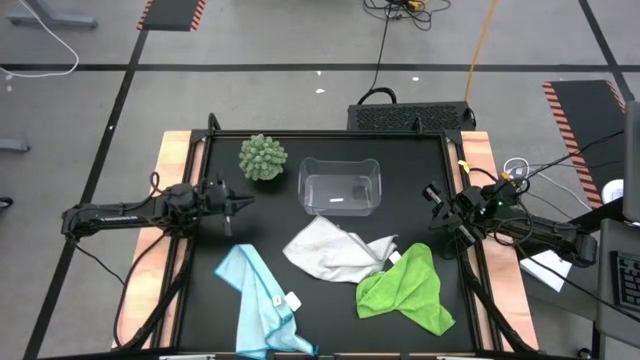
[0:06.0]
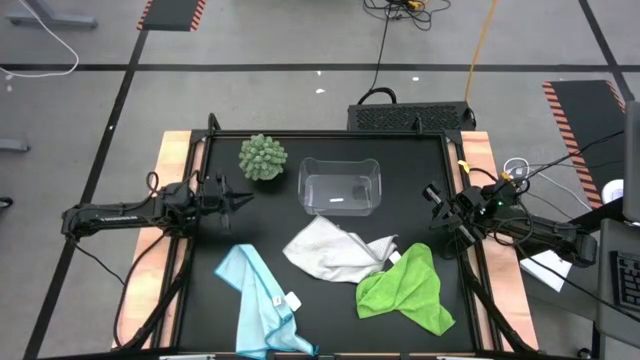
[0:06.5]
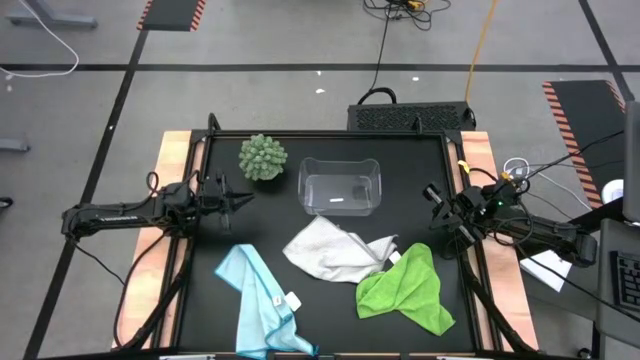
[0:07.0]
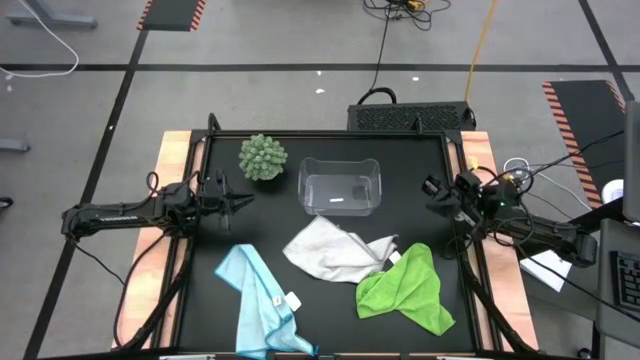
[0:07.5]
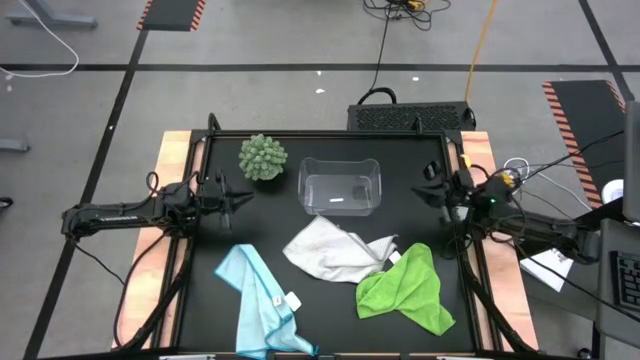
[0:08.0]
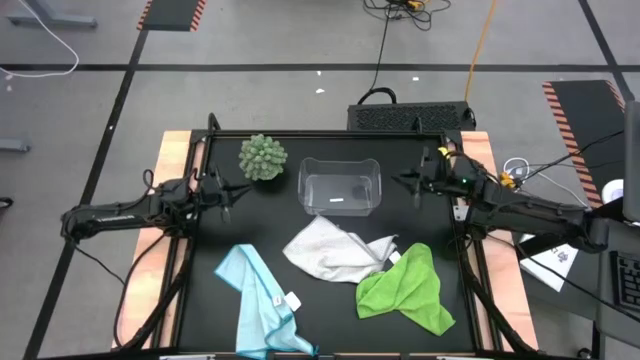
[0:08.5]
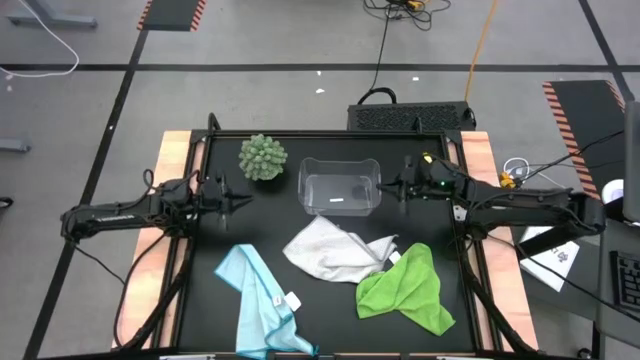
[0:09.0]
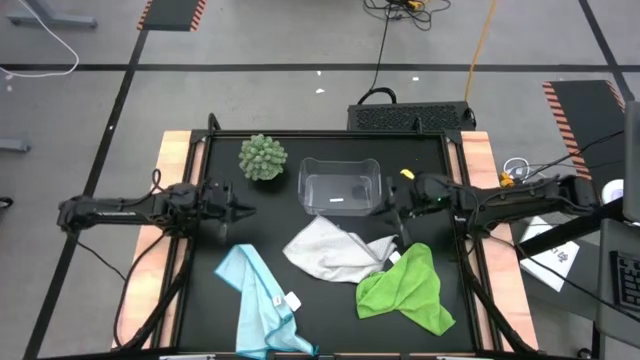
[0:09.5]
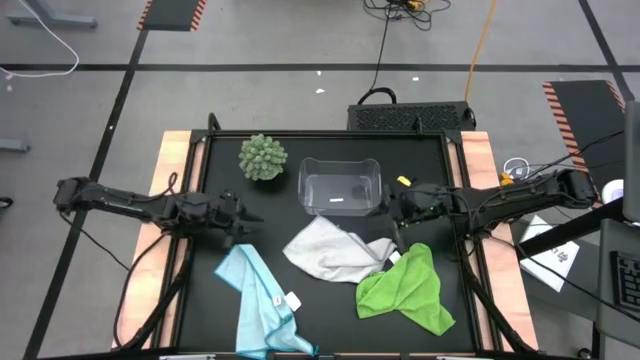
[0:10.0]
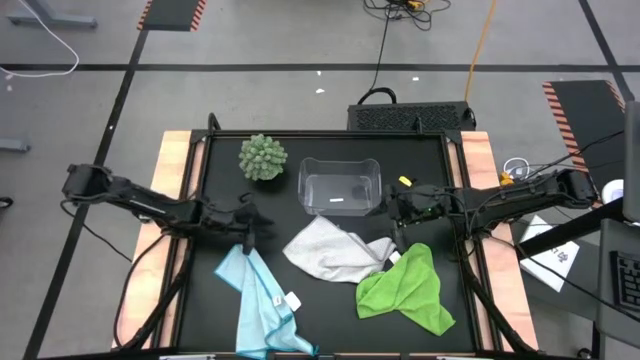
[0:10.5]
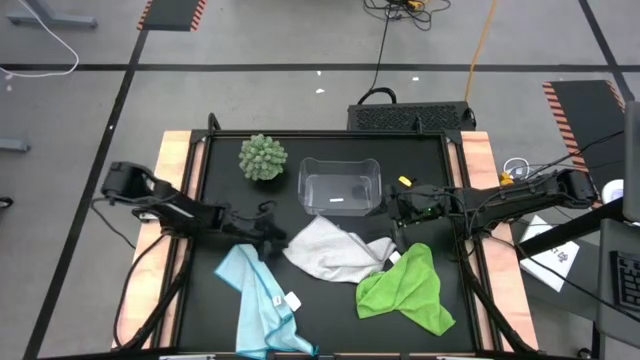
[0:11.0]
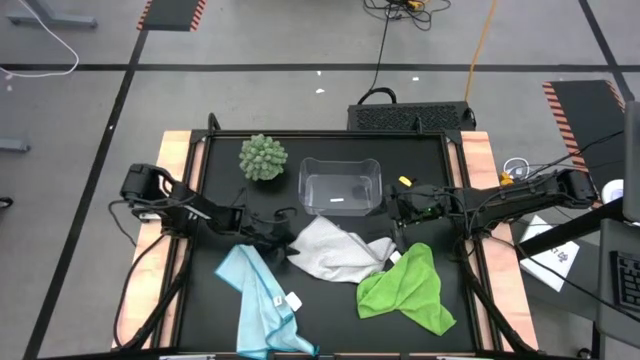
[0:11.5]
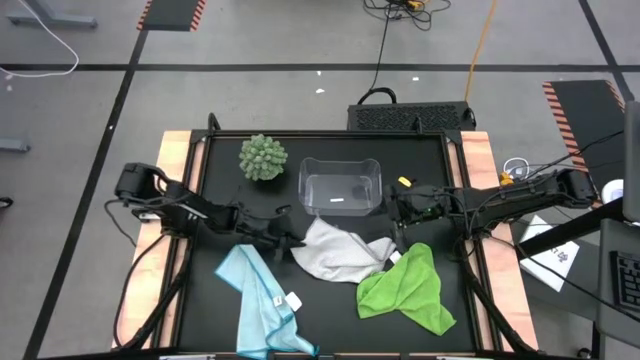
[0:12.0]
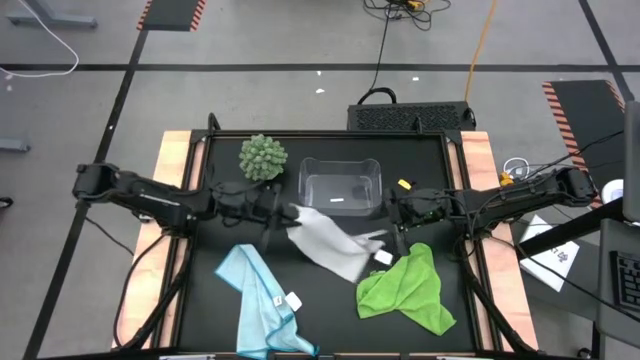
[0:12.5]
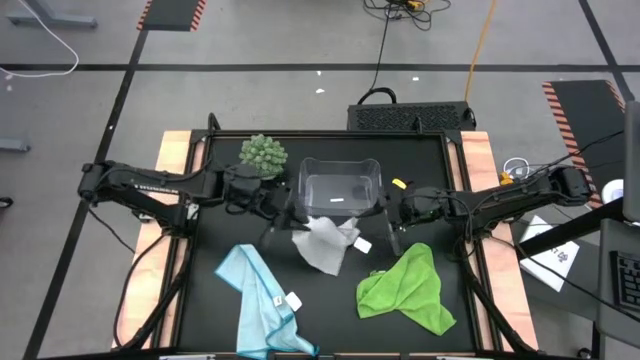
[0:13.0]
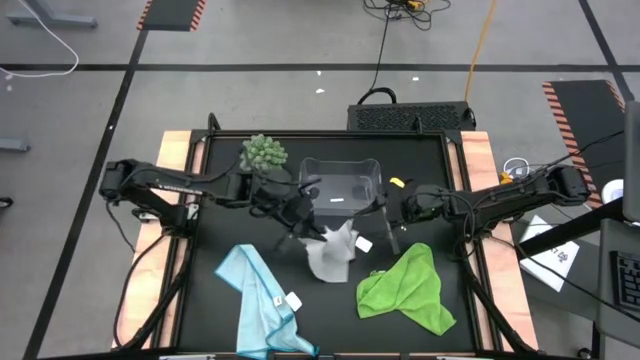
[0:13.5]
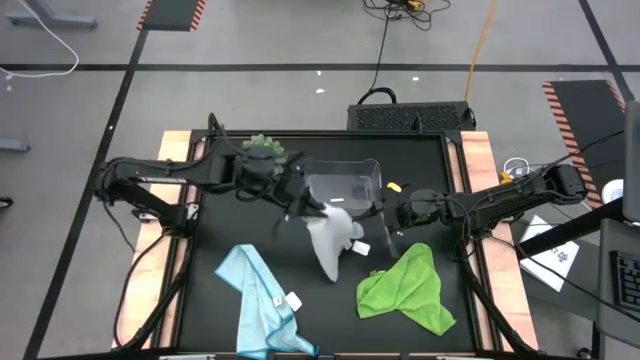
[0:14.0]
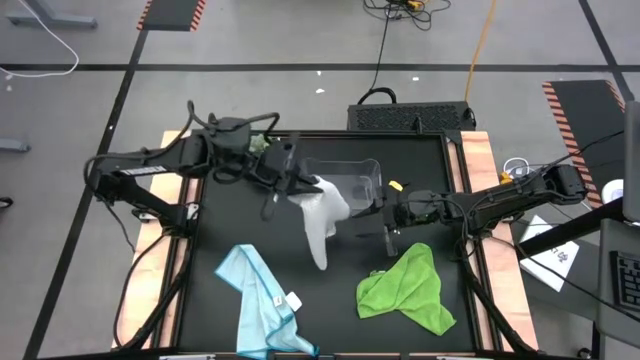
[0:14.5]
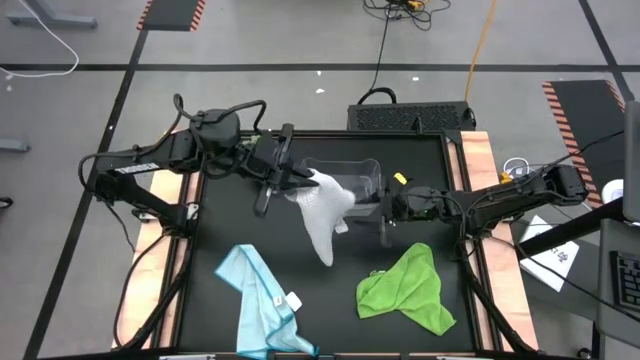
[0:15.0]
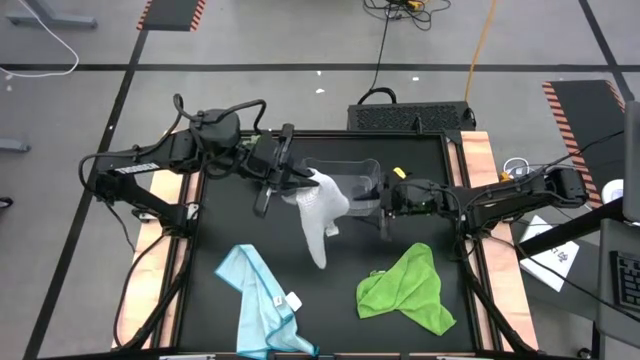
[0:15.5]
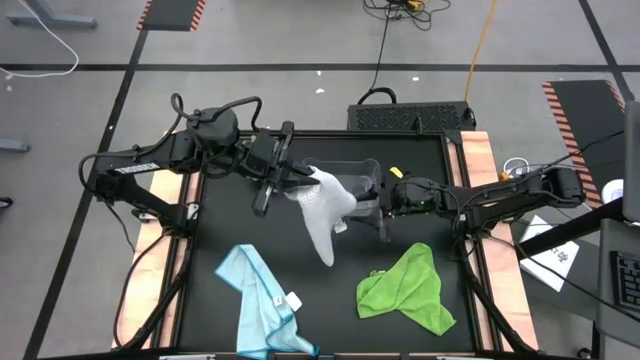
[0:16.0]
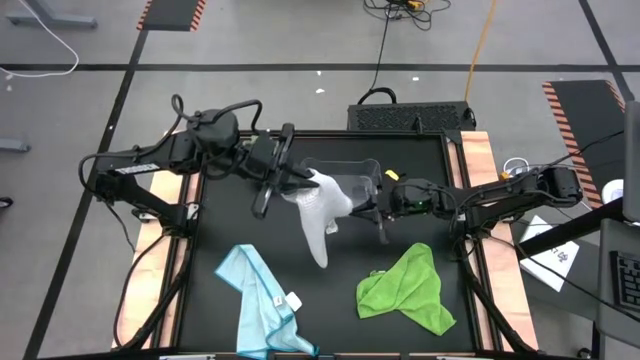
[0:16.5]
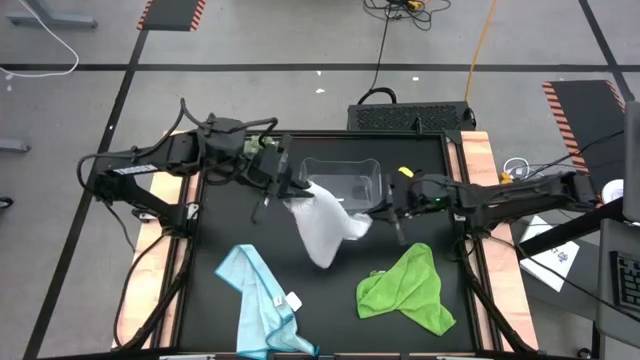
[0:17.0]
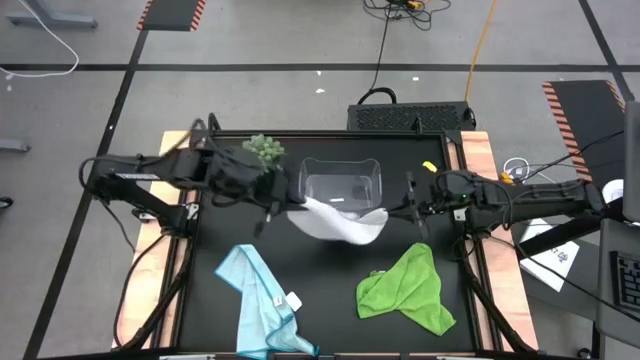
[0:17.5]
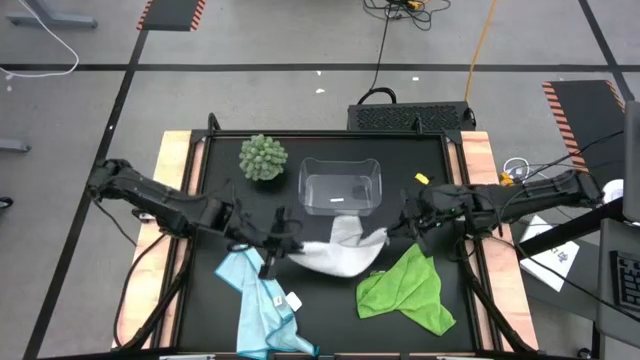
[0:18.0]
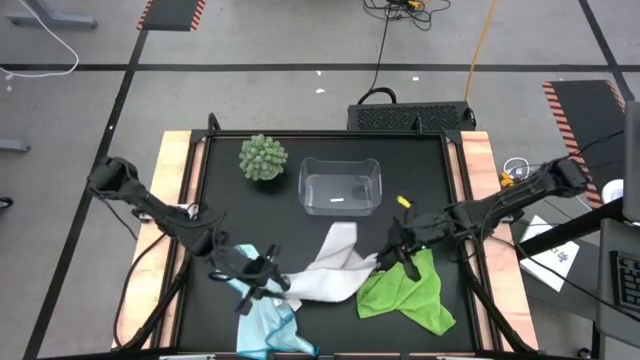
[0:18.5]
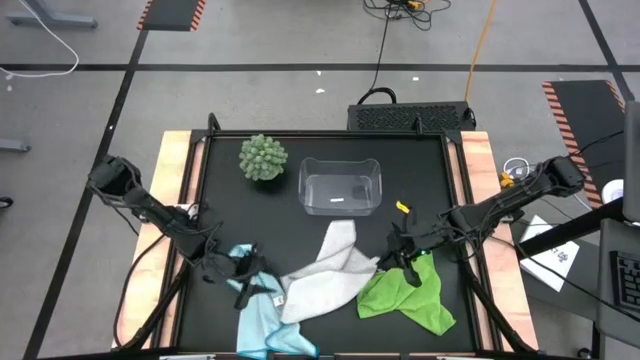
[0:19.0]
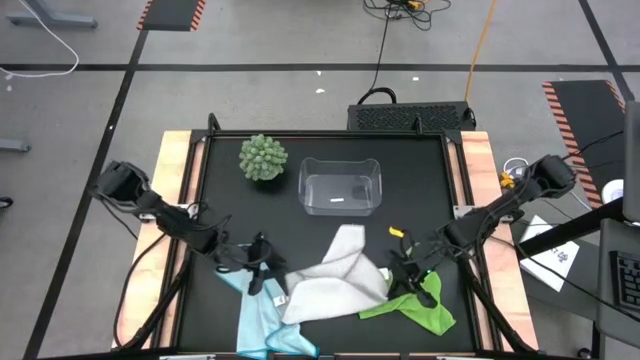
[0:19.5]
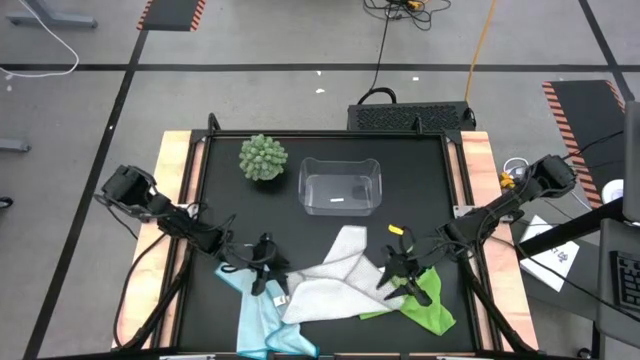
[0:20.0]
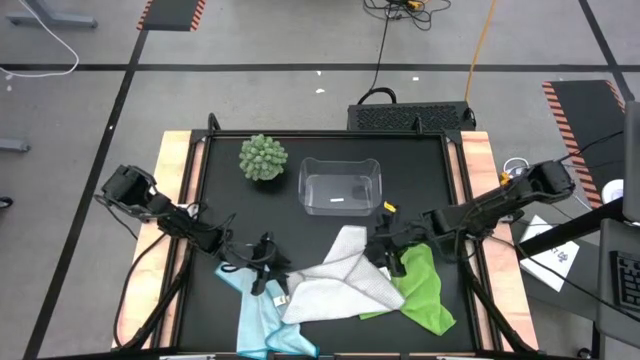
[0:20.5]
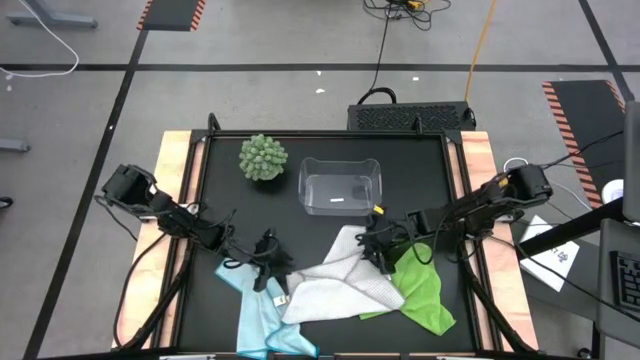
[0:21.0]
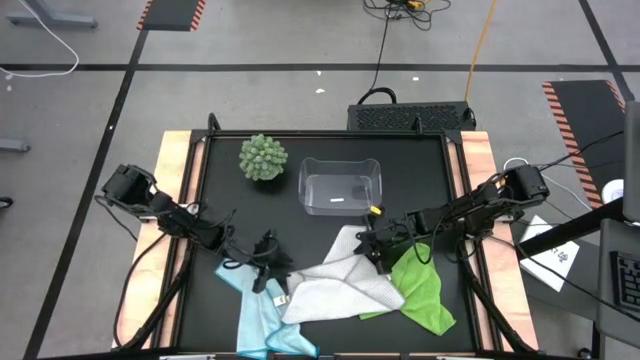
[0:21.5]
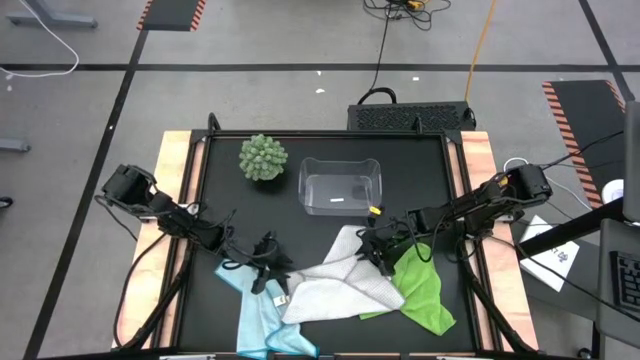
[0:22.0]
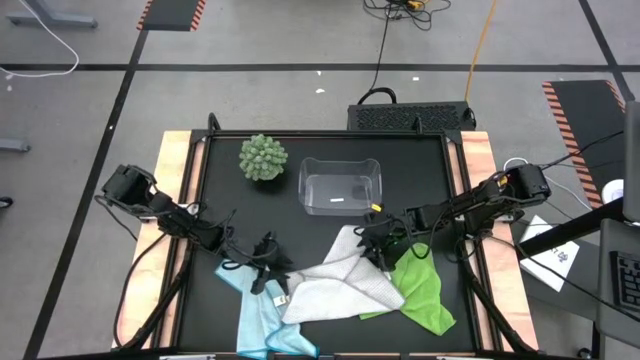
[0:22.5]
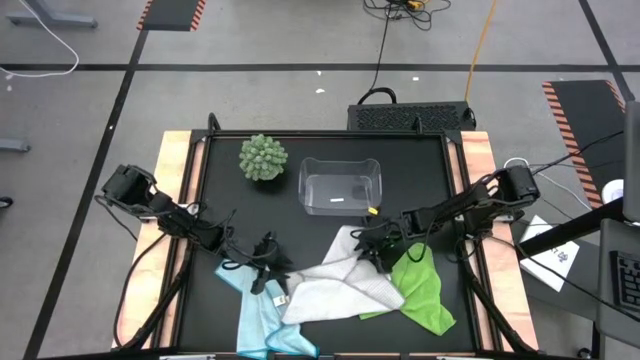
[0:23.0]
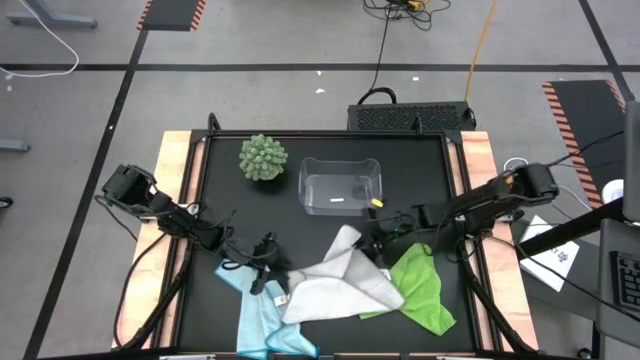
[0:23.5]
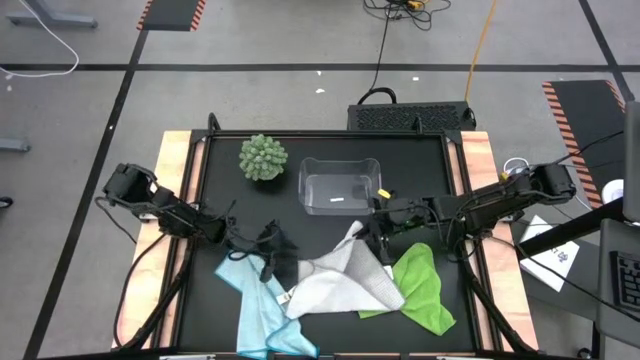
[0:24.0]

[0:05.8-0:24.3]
Task: Fold microfiber towels
Fold the gray towel

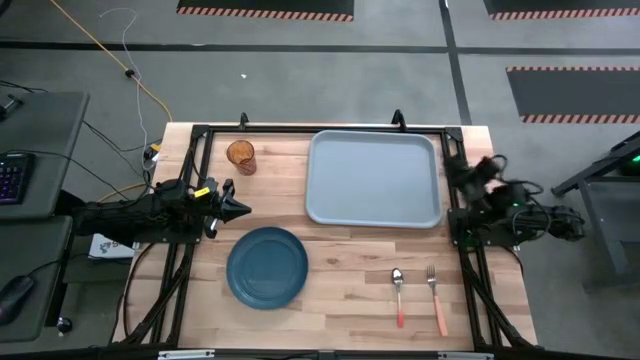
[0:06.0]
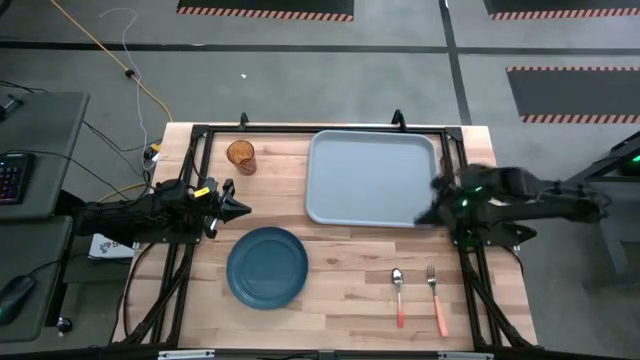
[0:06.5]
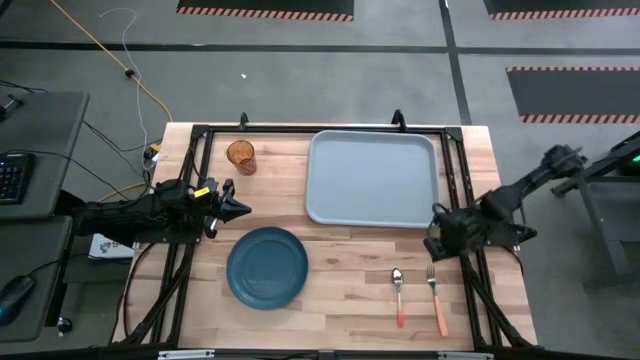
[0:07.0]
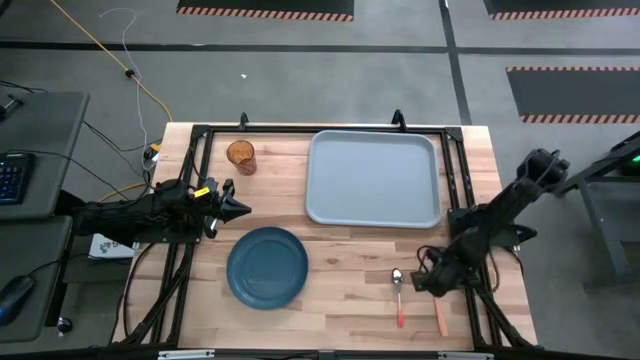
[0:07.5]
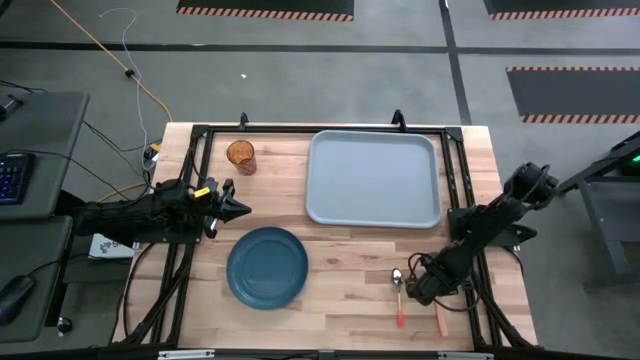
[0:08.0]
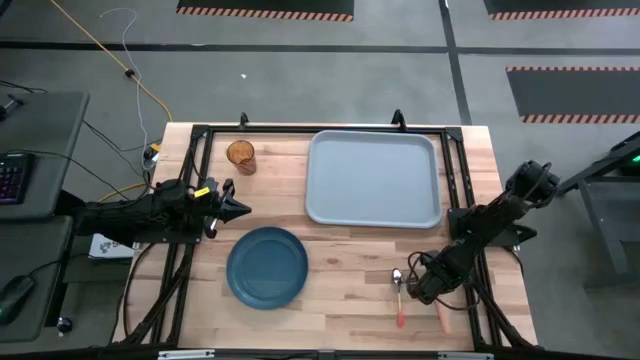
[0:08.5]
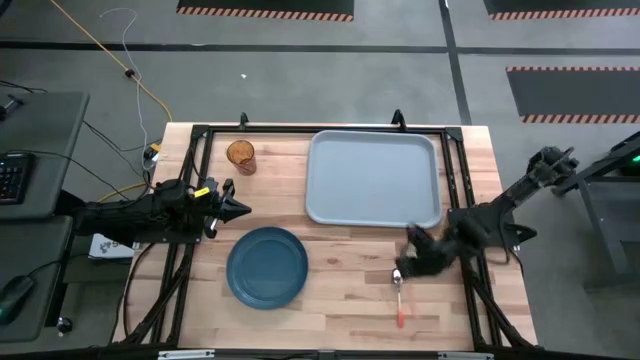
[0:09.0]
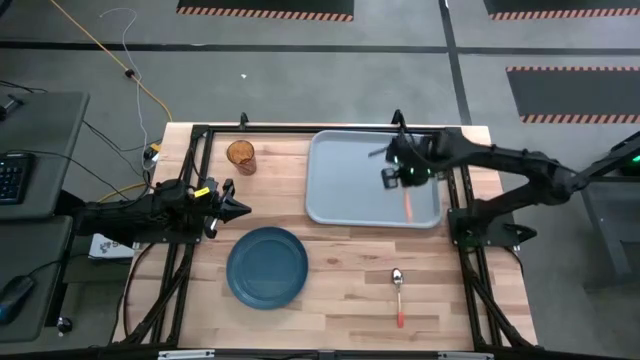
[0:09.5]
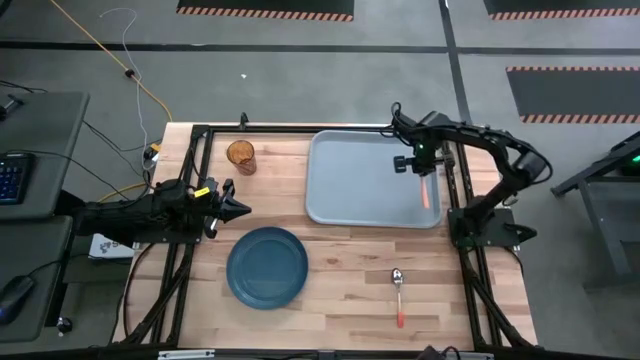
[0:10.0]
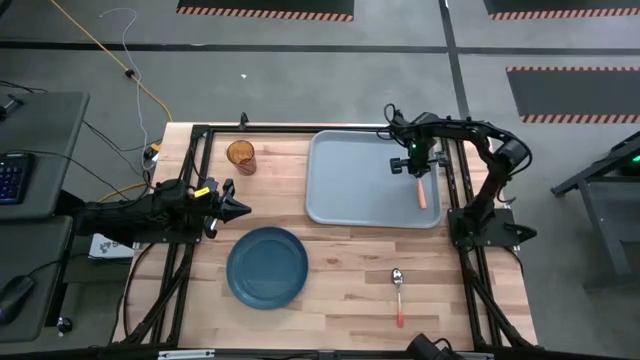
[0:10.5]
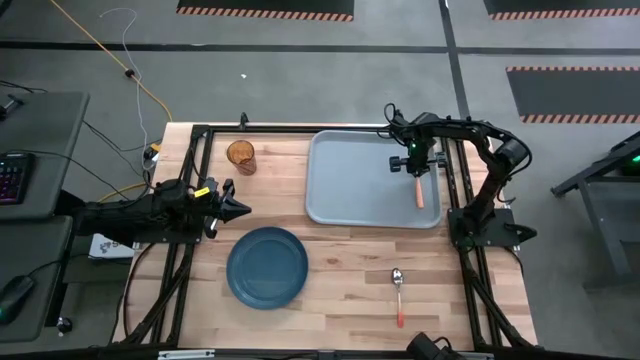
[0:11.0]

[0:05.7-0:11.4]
Task: Pick and place plate/cup/fork/spoon on tray
Put the orange fork to the left of the blue tray
